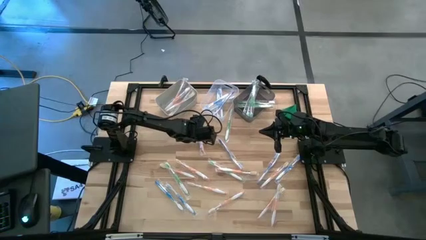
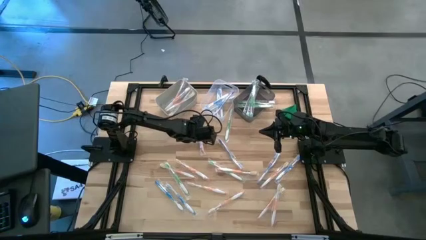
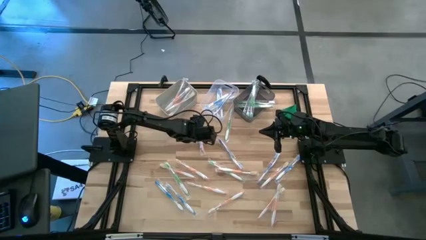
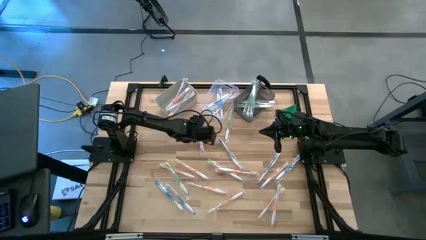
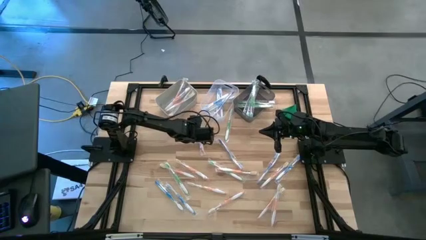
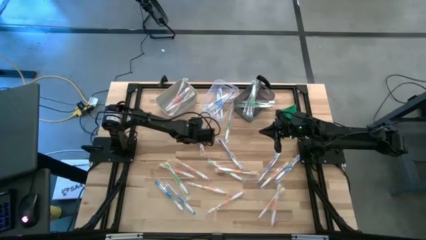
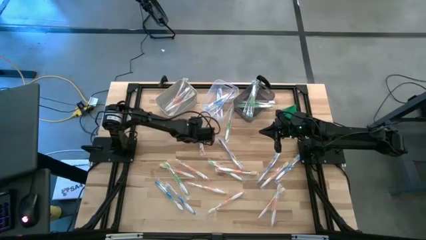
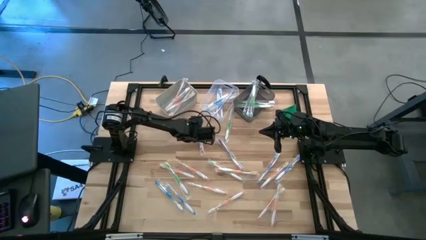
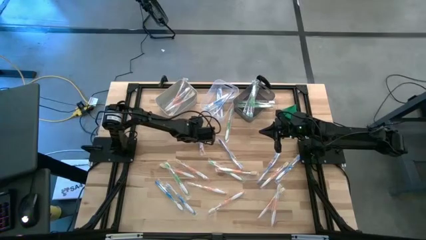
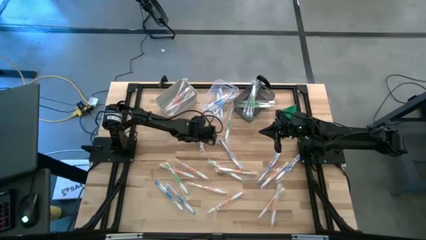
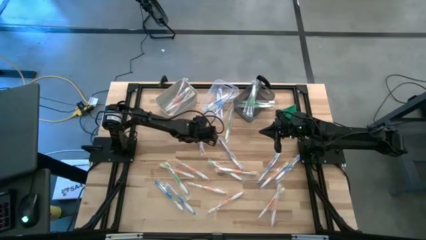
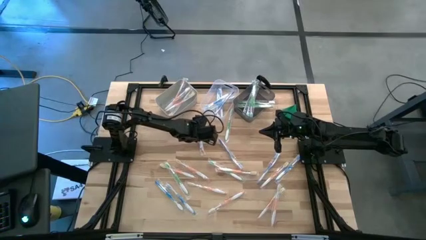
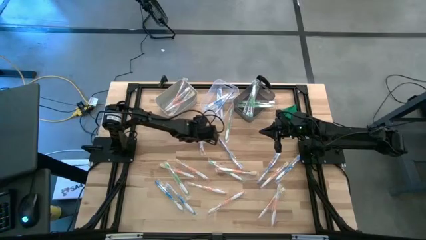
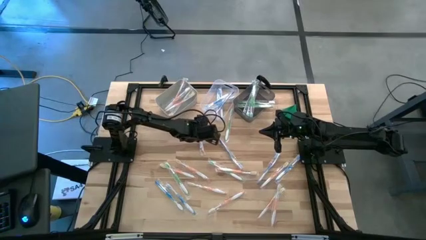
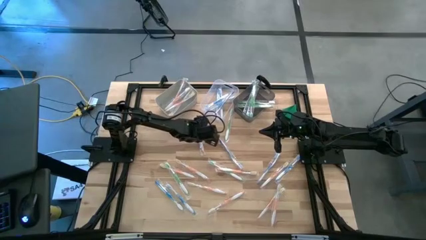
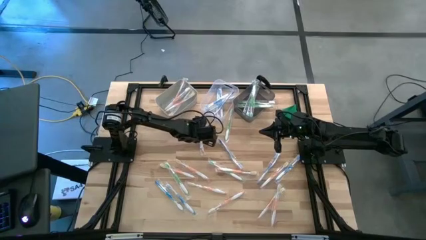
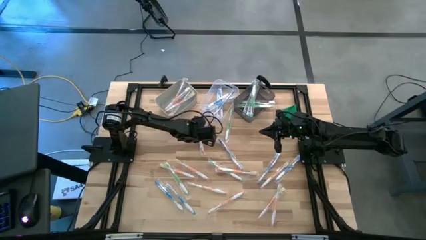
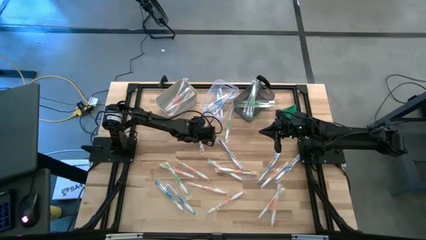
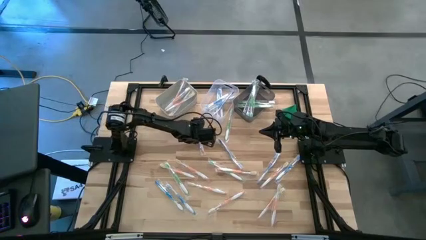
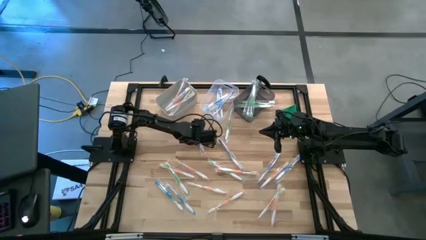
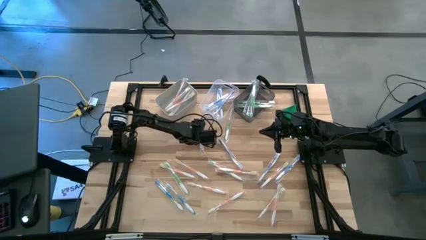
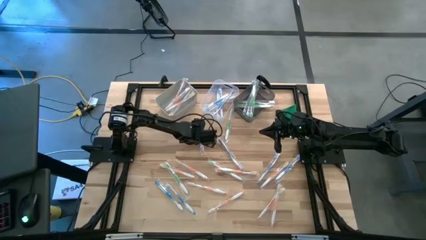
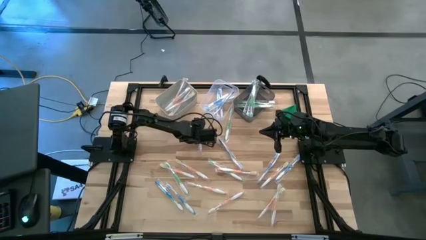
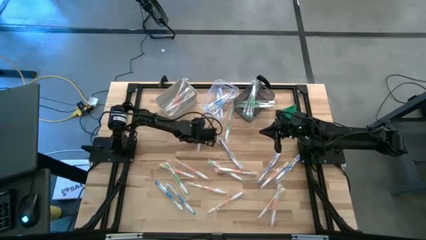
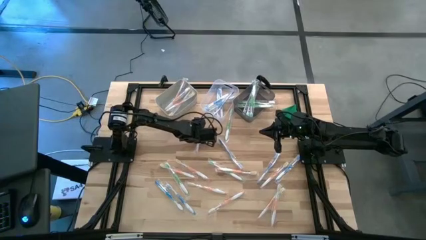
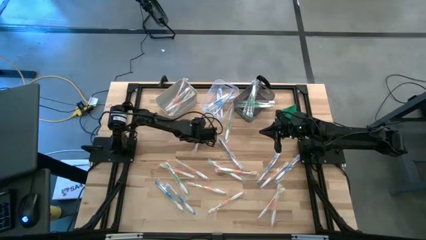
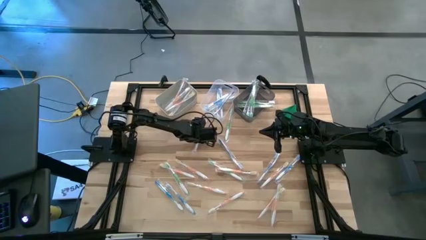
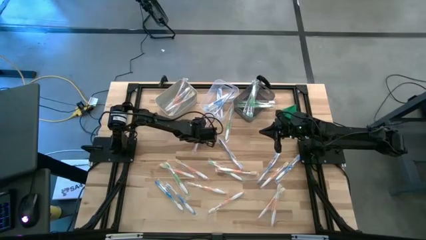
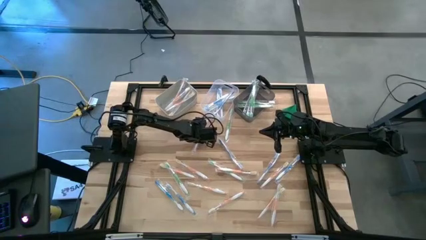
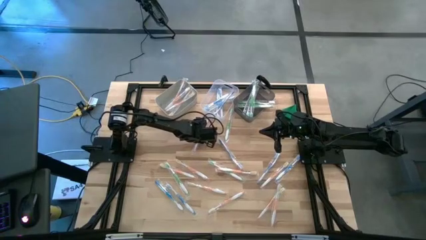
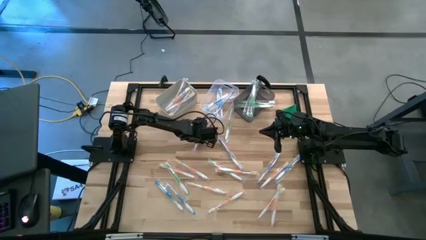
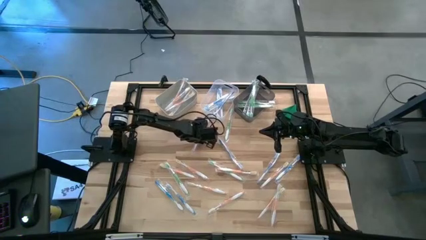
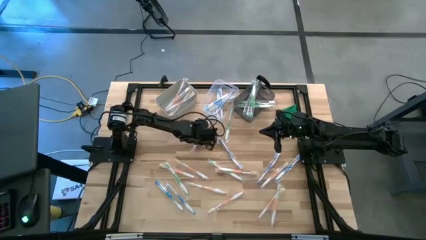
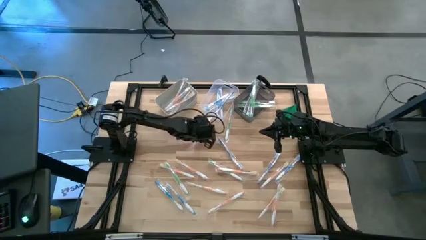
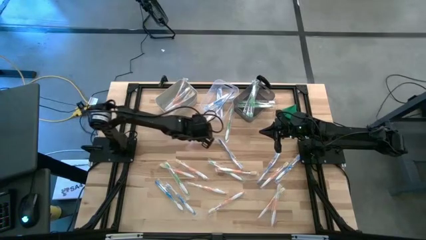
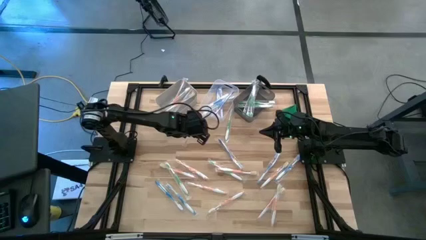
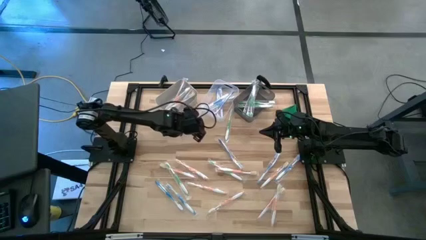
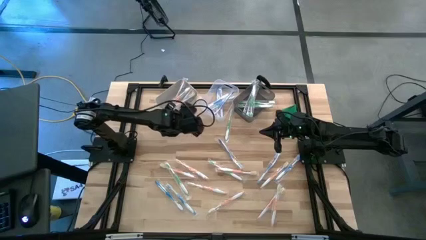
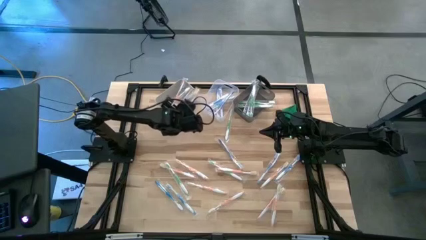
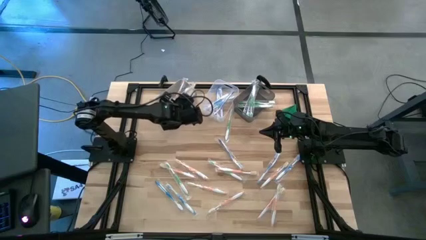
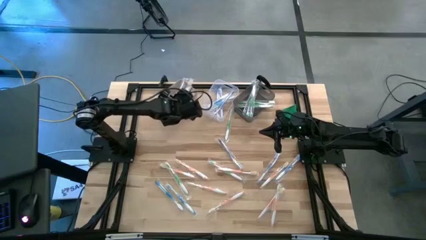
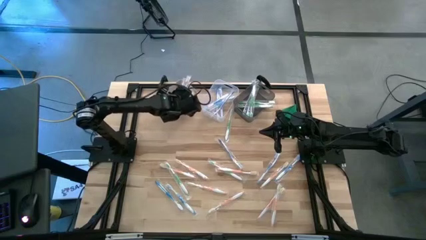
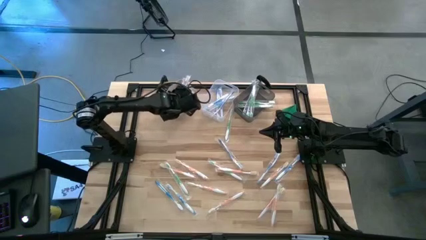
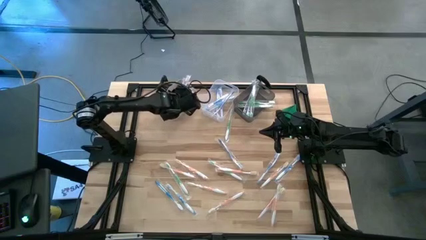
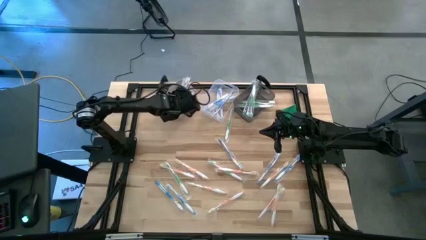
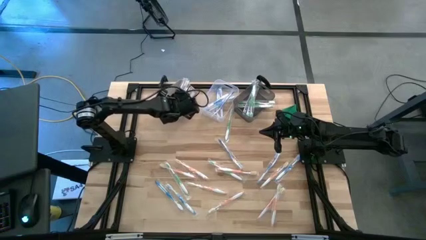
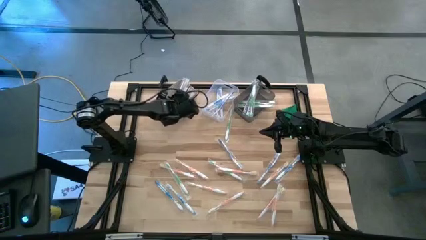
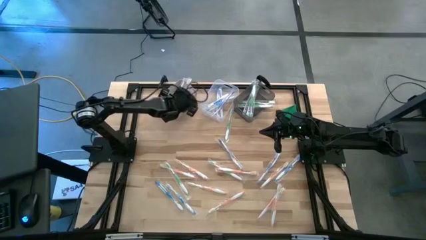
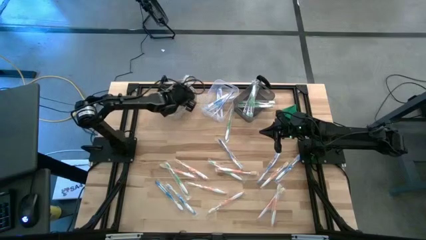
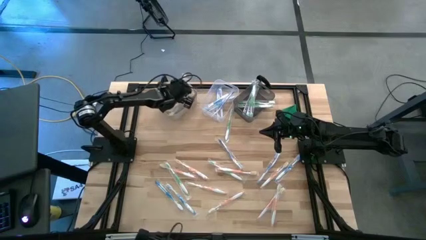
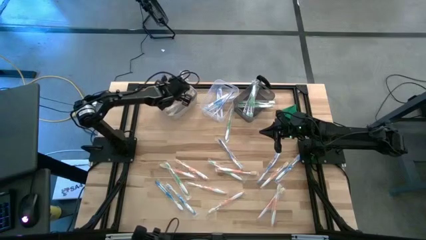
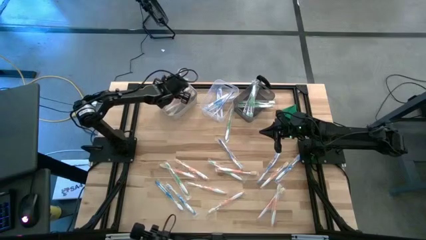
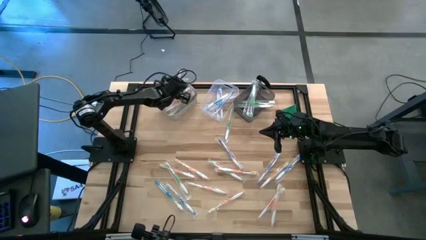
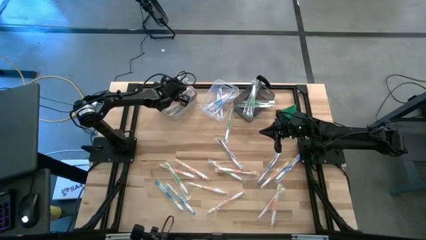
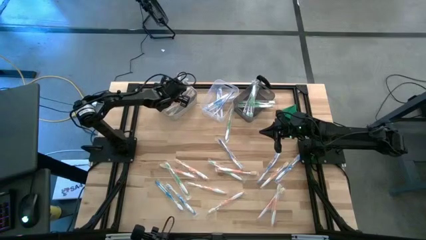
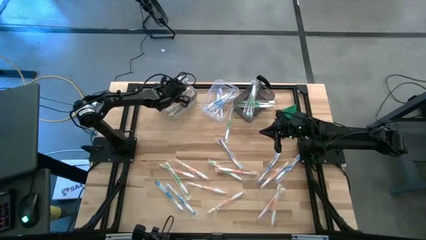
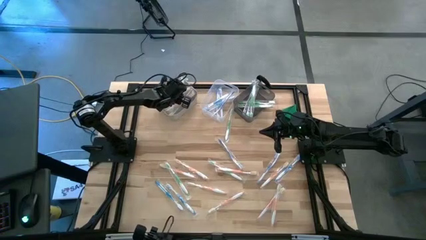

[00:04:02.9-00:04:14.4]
Task: Pick & Place Toothbrushes
Put the orange toothbrush into the white bin

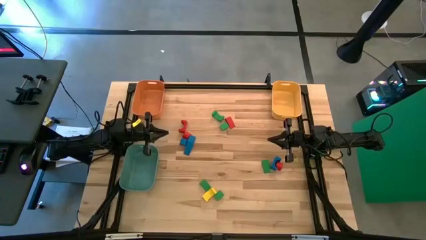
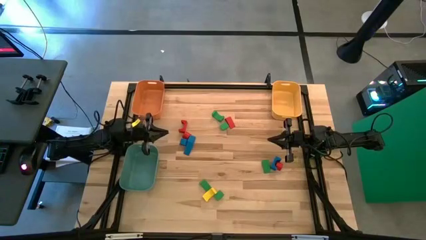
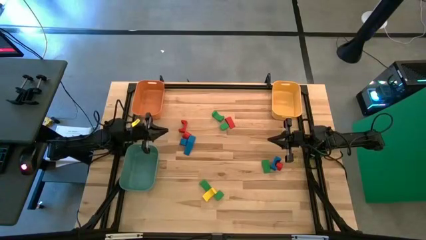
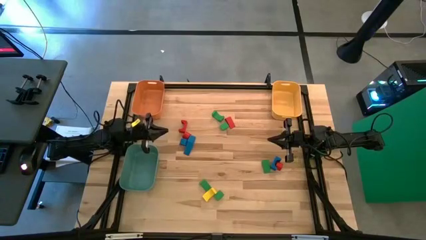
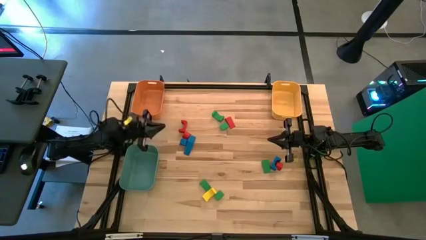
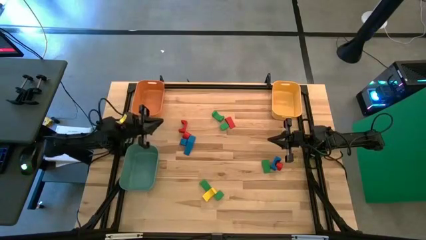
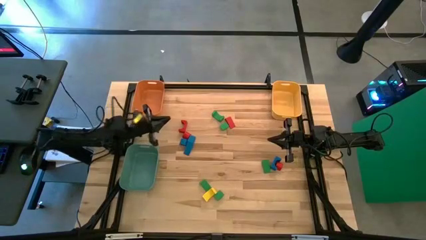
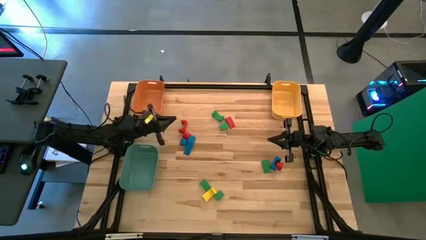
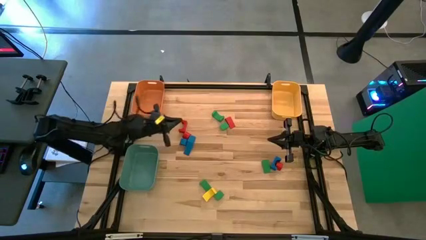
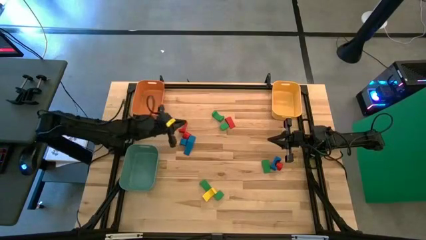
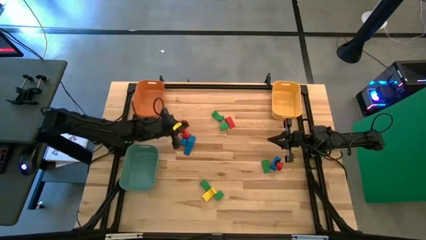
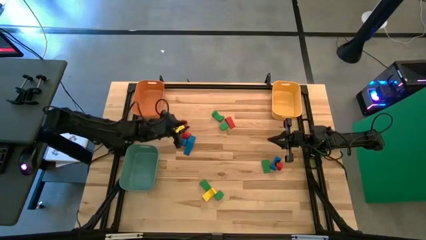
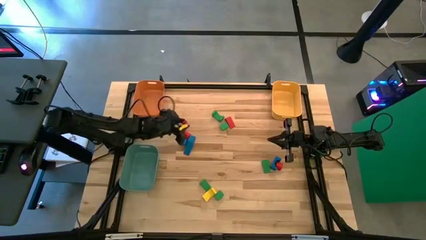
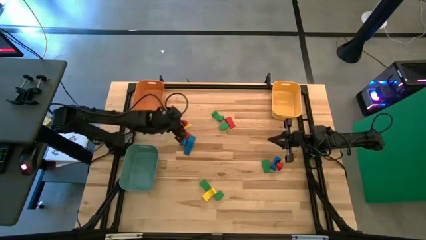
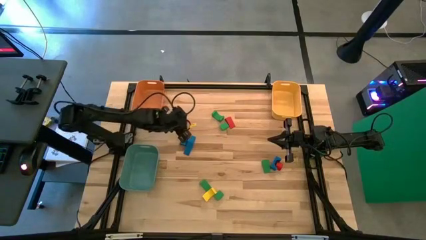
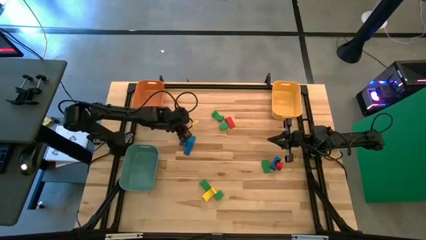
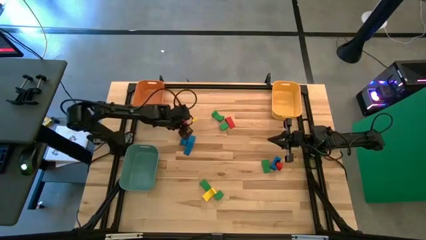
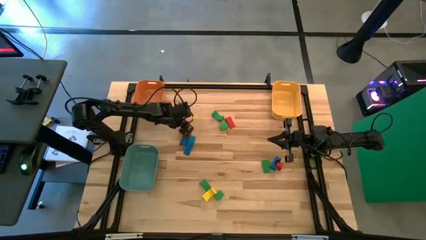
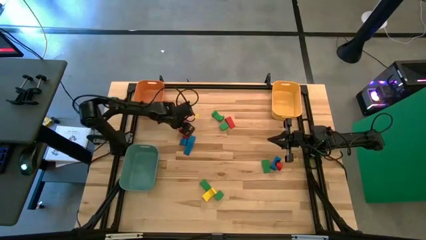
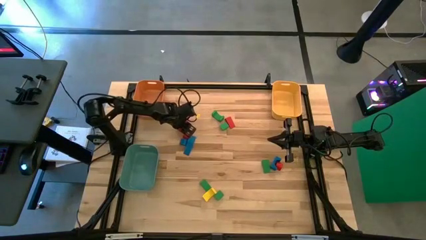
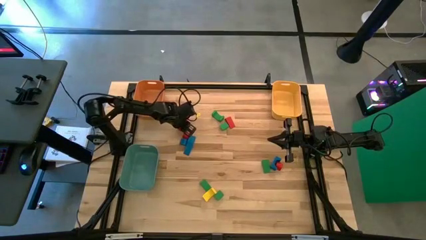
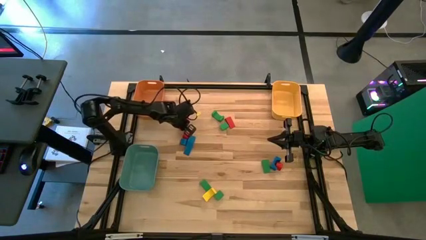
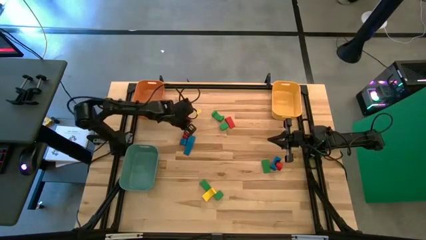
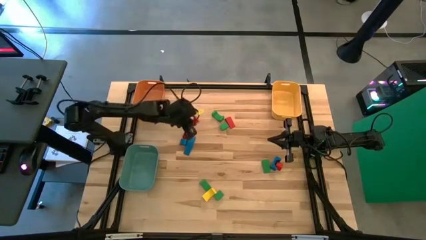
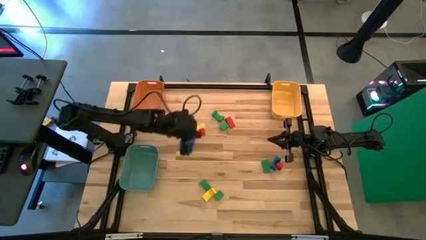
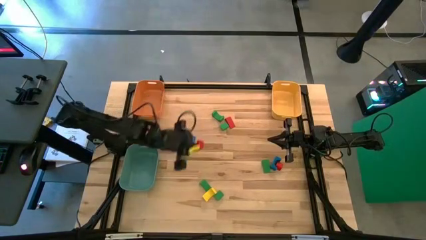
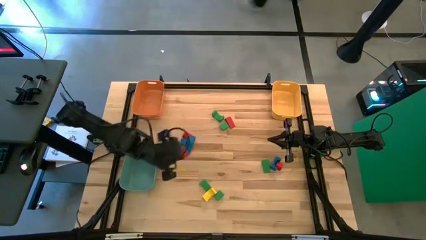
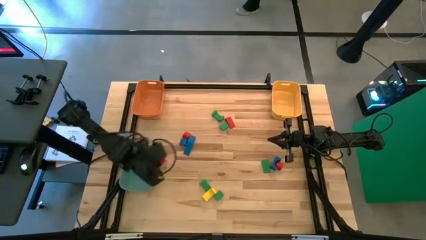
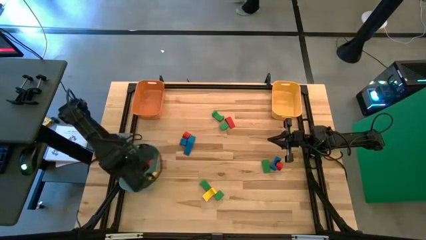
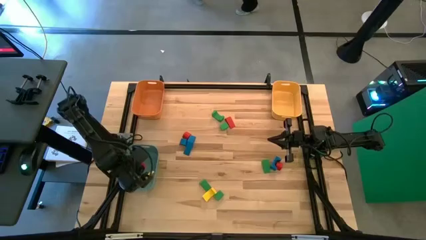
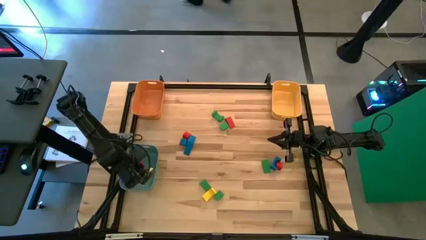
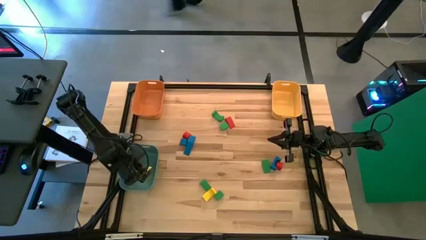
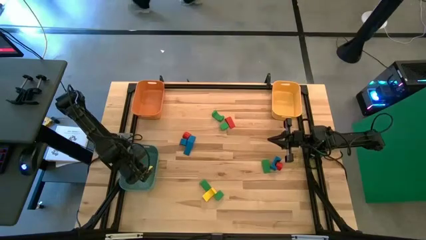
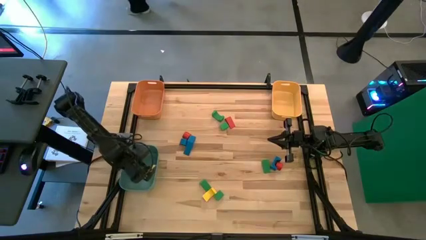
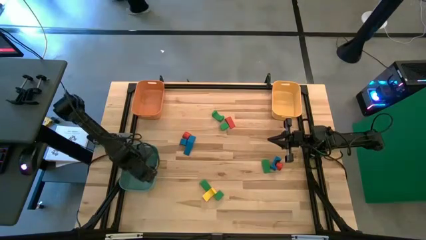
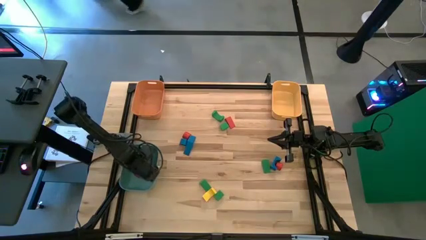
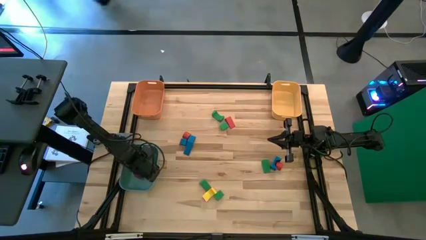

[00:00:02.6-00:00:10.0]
Task: Sort blocks by size
Put the red arch block into the blue bin
